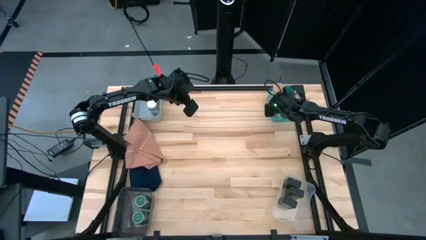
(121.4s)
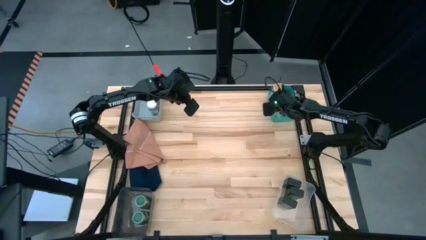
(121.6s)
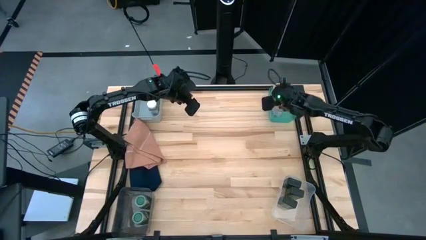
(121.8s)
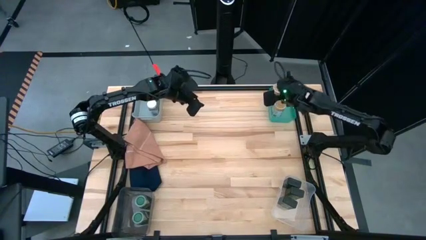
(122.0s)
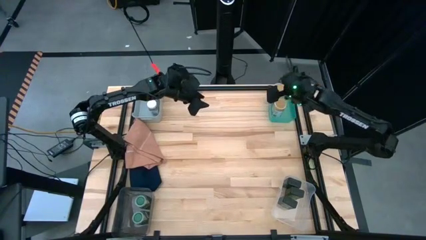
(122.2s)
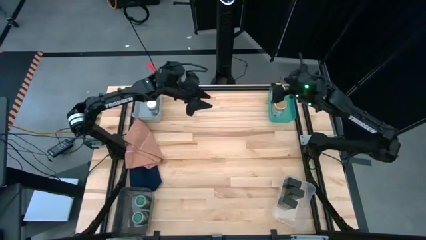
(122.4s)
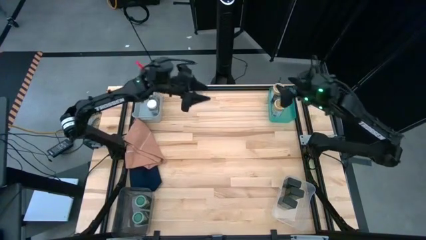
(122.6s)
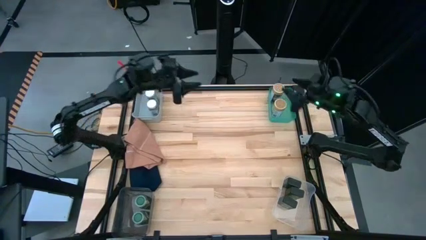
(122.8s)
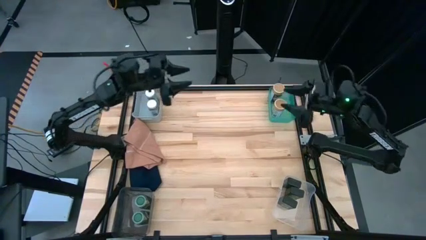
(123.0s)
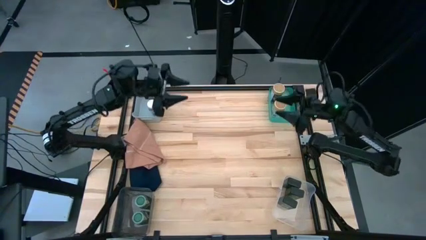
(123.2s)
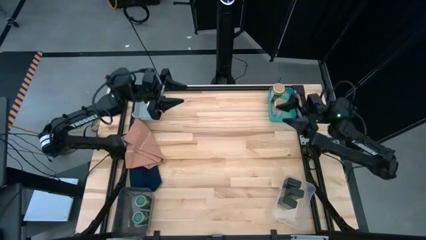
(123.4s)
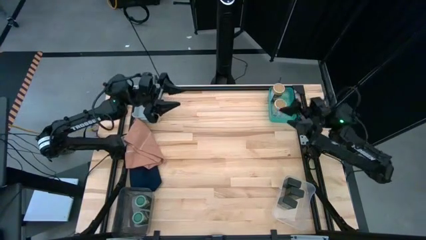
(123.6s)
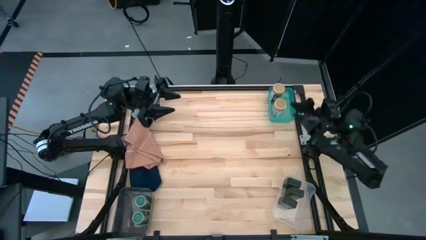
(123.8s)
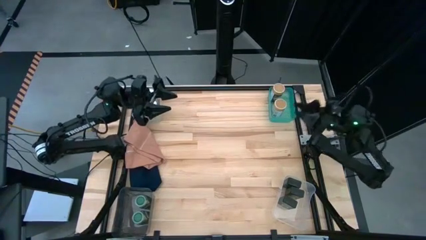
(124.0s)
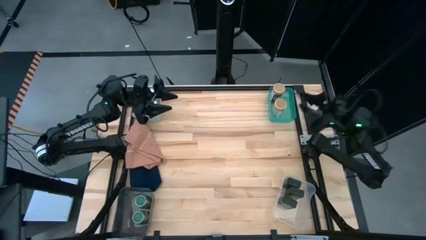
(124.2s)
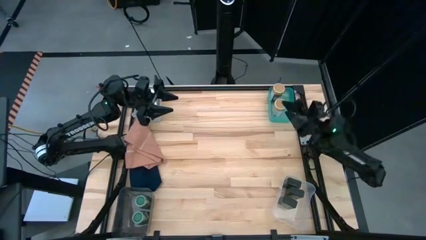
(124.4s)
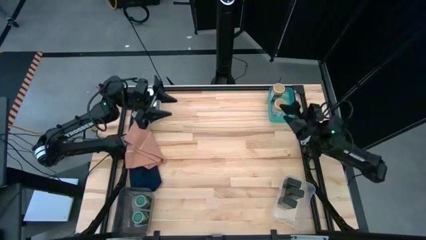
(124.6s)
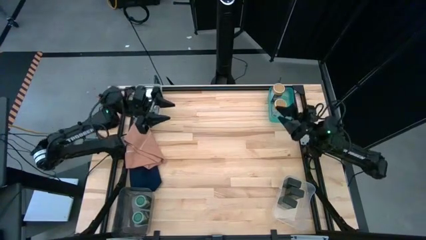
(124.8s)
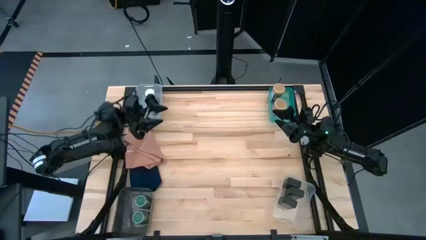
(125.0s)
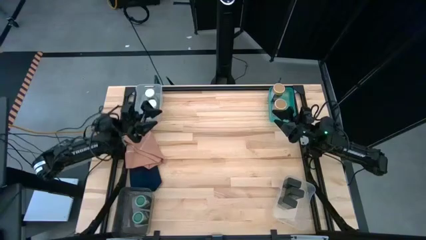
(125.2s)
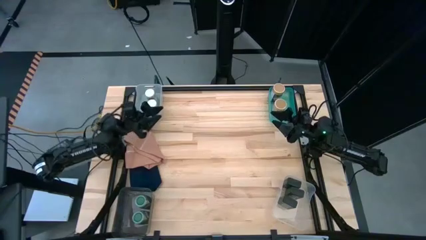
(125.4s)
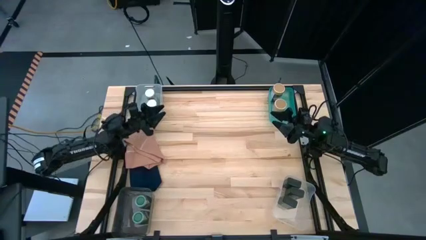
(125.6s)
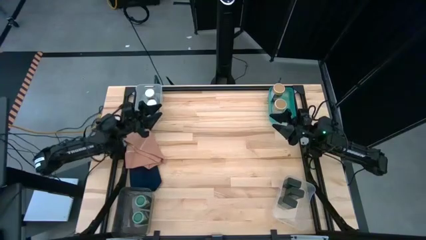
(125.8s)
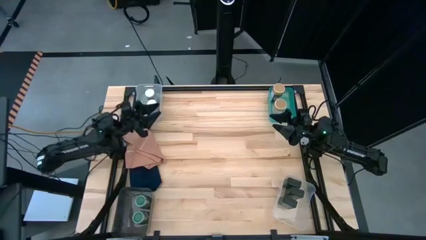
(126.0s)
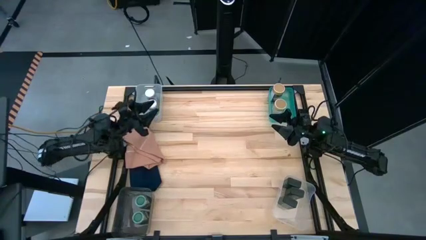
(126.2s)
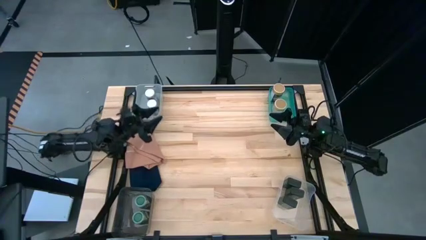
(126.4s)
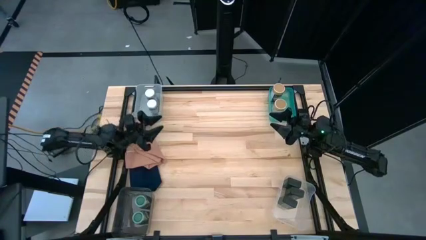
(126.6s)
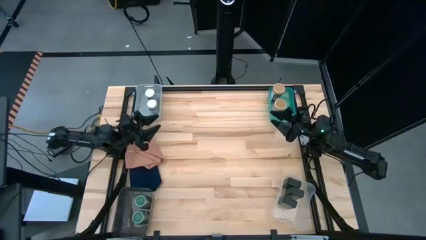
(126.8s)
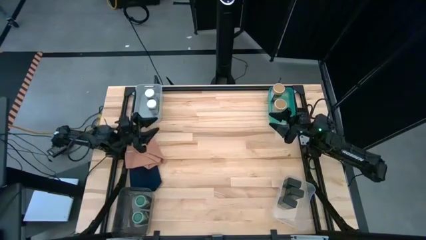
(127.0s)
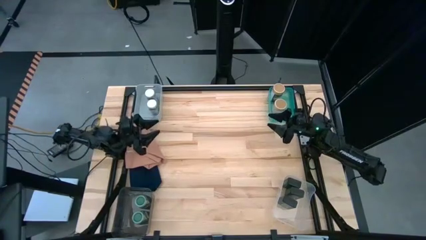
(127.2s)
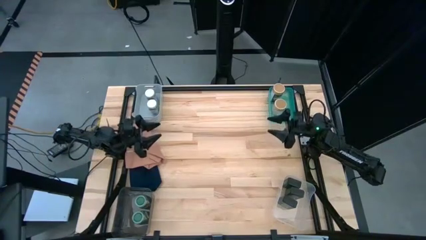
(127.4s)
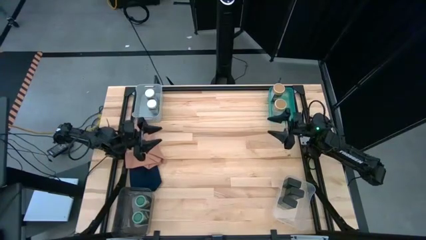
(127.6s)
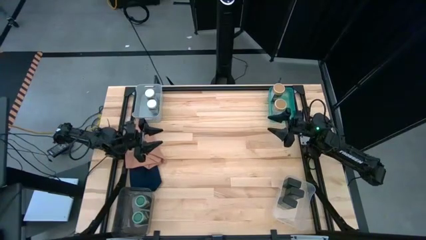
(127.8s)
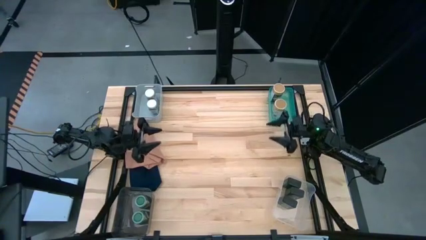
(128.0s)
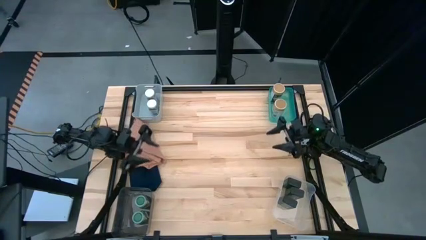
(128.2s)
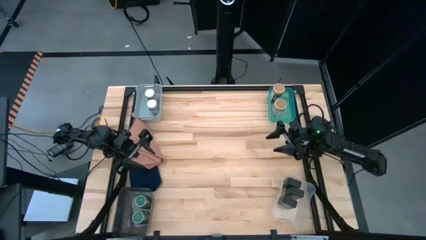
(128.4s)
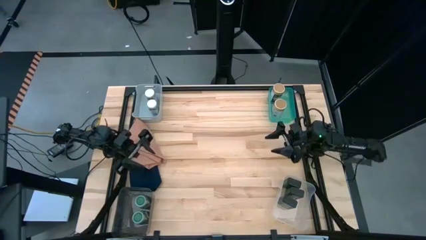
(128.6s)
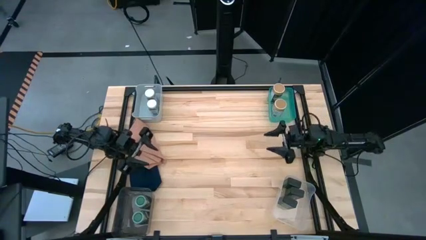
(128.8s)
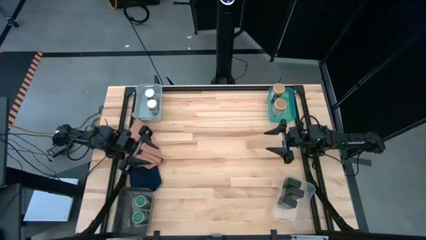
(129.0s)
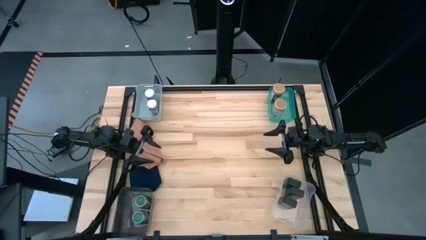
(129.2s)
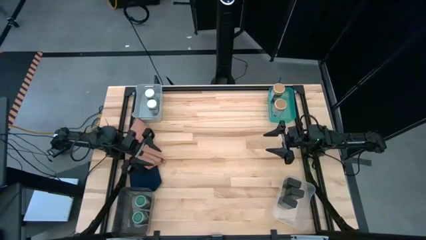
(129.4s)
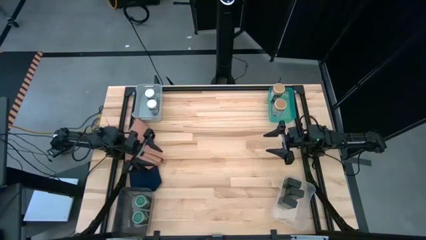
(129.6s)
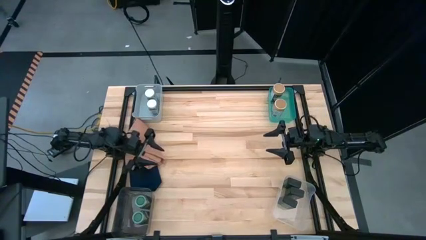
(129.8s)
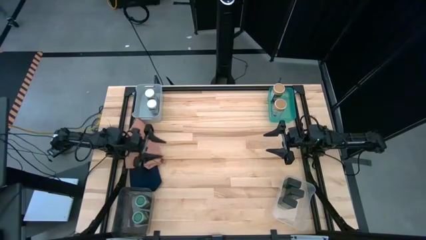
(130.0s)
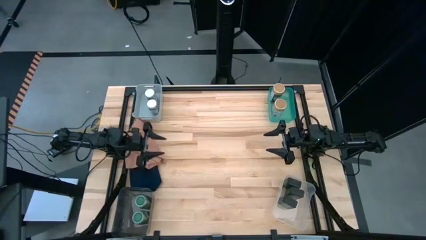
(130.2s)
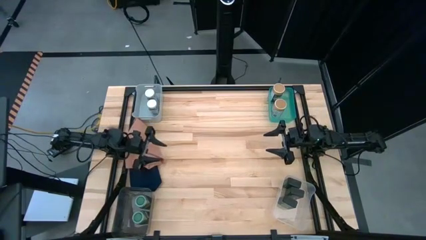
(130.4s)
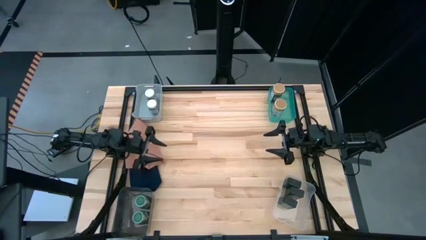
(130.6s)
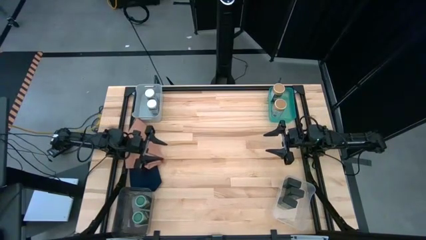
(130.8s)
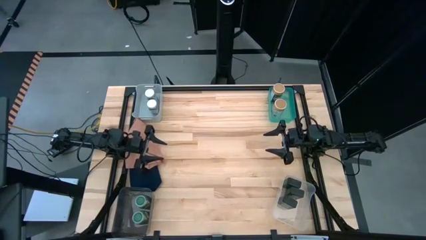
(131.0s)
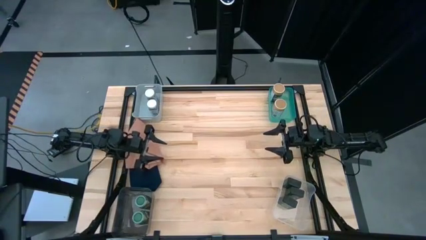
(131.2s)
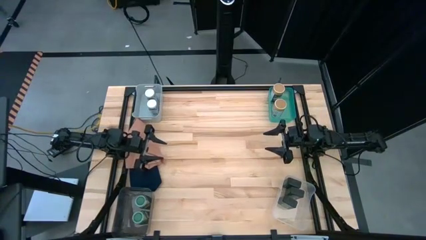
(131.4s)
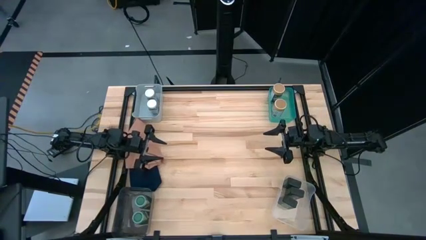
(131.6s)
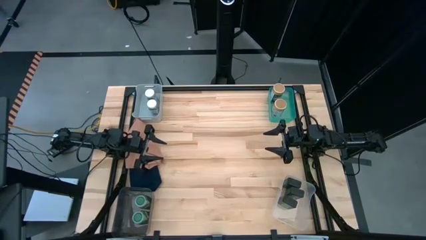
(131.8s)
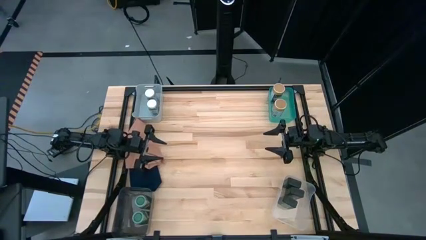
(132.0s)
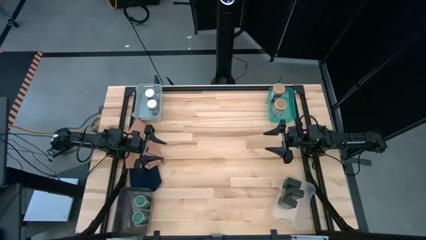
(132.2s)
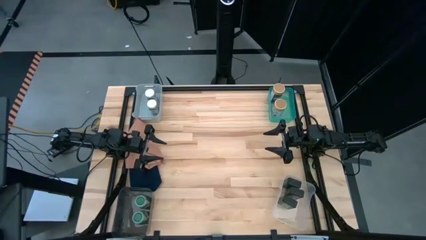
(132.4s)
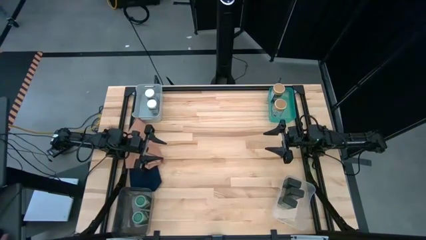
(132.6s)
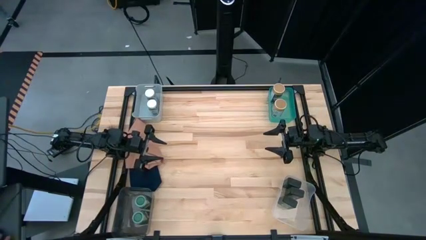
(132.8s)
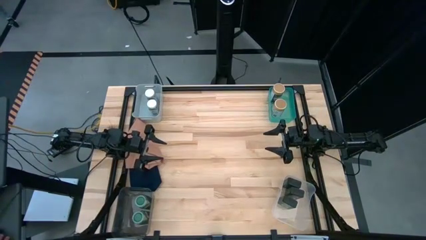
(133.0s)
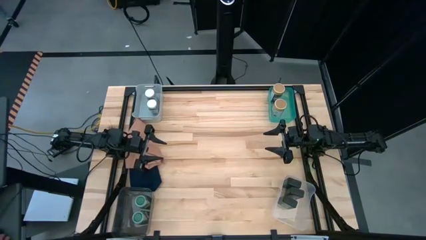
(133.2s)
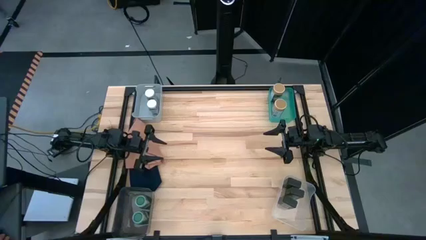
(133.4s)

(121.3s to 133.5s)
Task: Sort spices by type
Return to Home Position

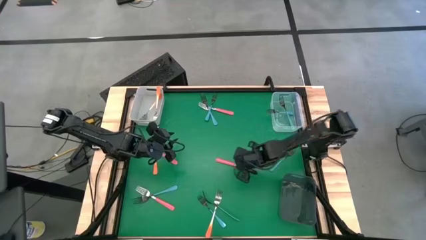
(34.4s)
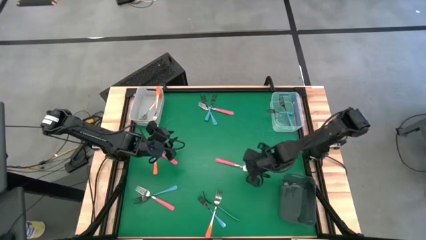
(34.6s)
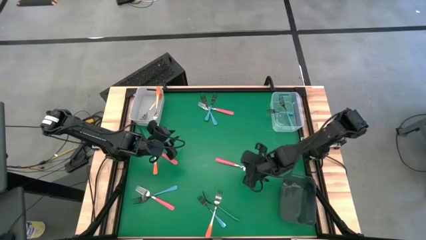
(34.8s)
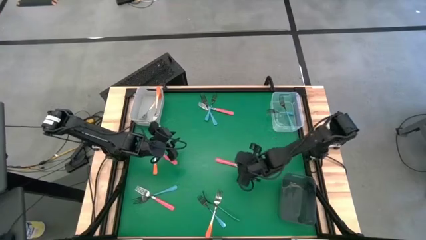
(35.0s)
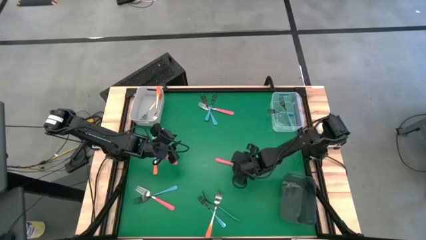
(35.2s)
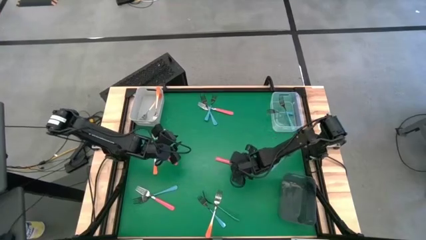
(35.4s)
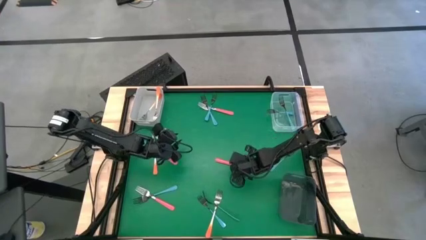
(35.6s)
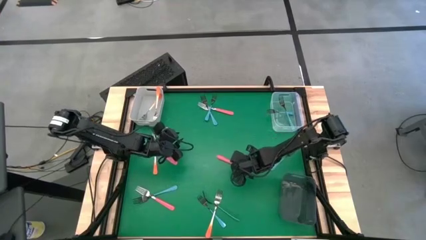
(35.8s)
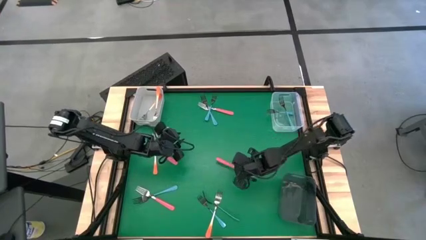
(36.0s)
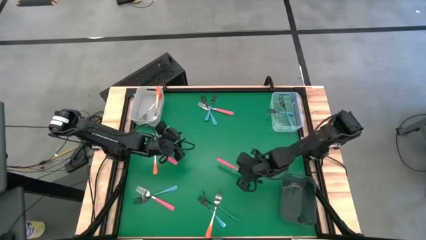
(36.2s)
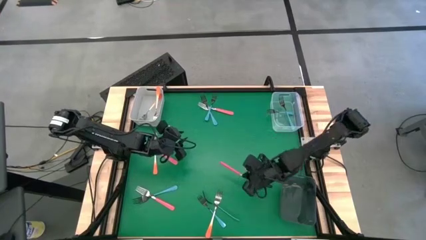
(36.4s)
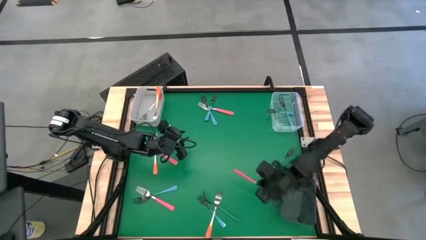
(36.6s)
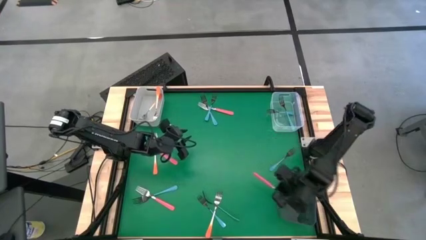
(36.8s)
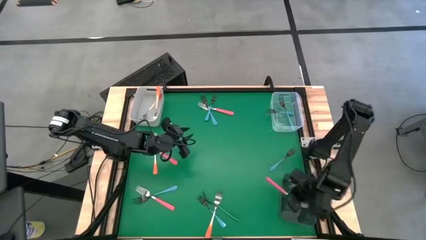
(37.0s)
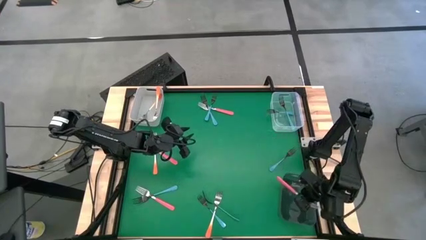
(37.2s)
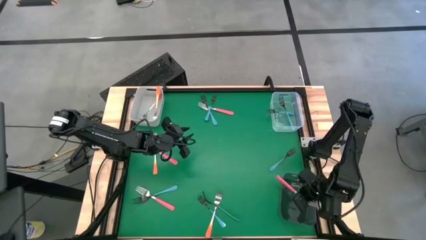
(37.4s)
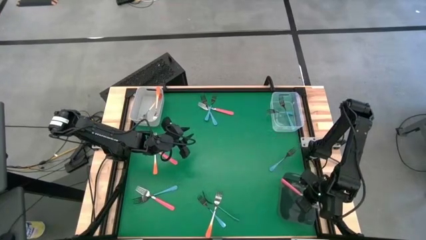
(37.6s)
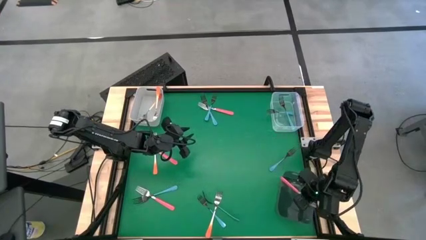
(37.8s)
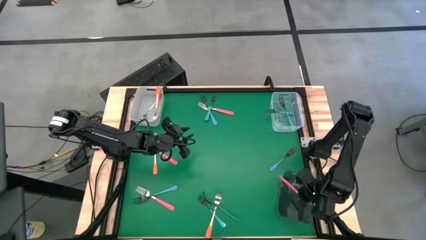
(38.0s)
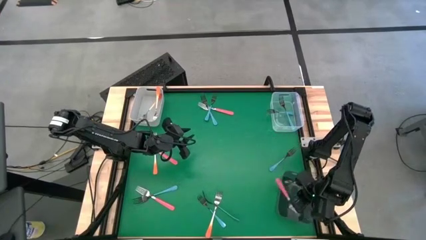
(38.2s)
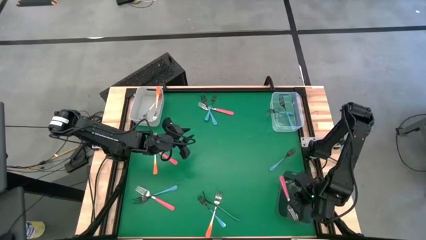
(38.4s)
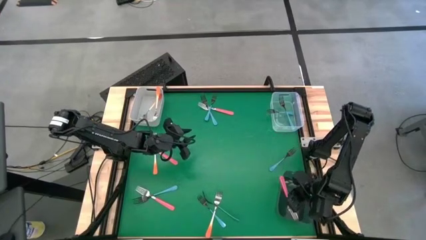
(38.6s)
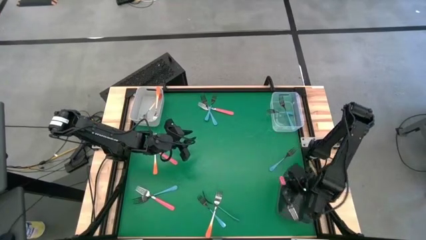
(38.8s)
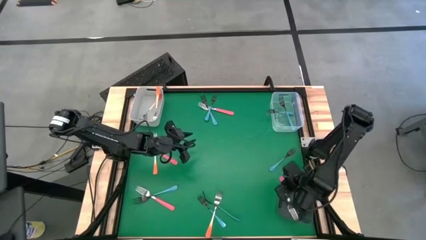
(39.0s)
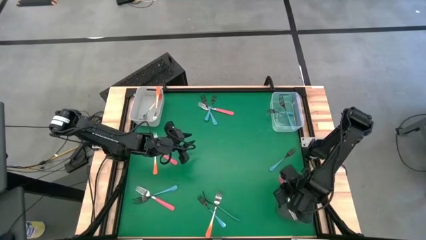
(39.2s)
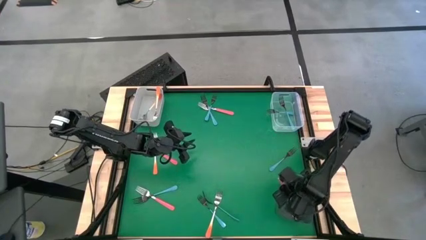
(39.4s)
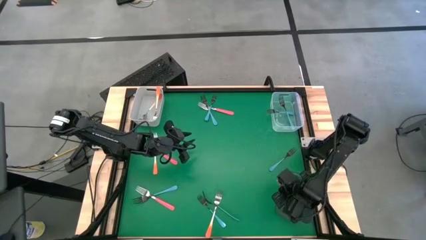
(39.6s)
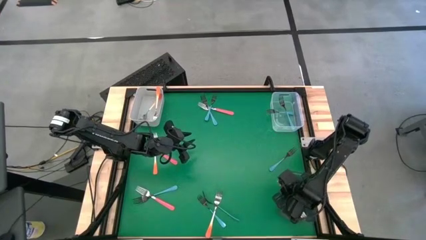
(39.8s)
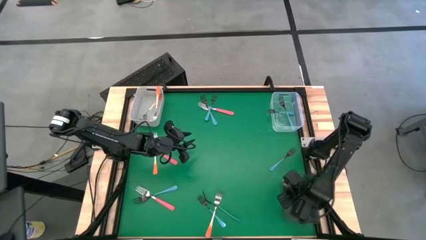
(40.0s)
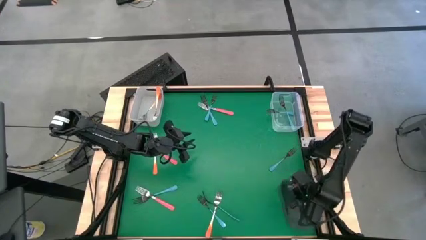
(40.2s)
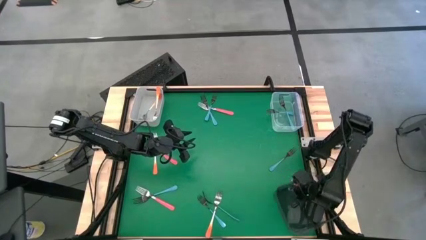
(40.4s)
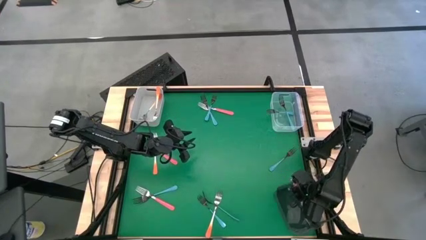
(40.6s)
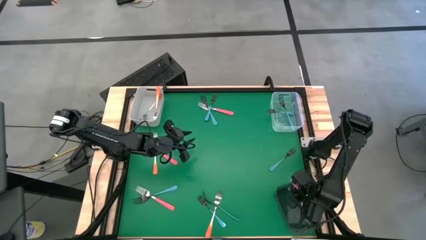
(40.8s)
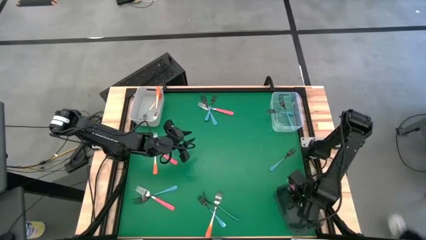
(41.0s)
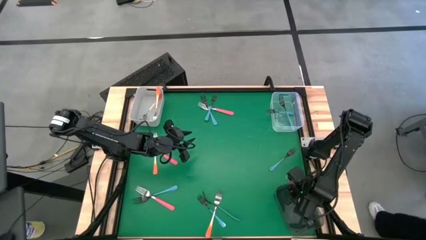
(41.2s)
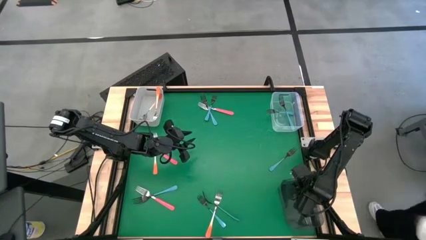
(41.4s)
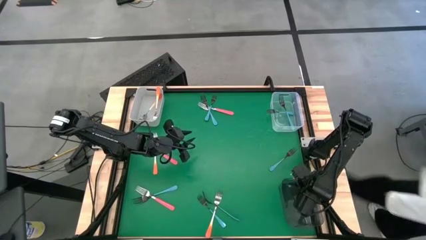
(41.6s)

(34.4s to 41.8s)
Task: Sort silverware by color (type)
Put the pink fork into the black bin
